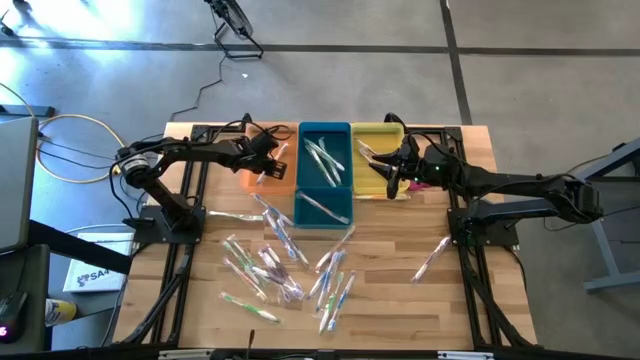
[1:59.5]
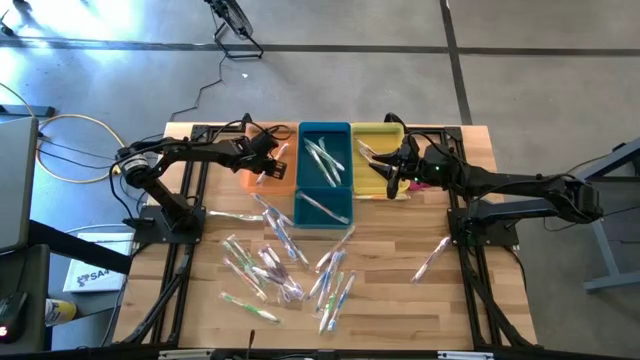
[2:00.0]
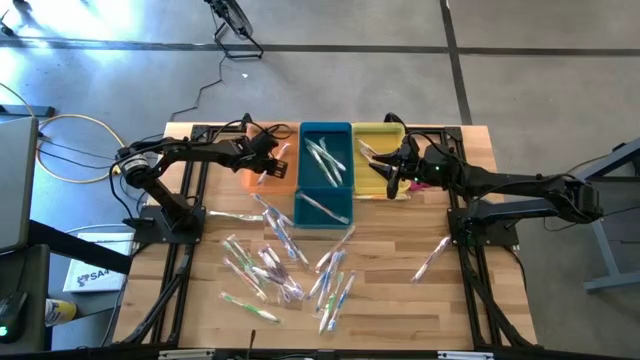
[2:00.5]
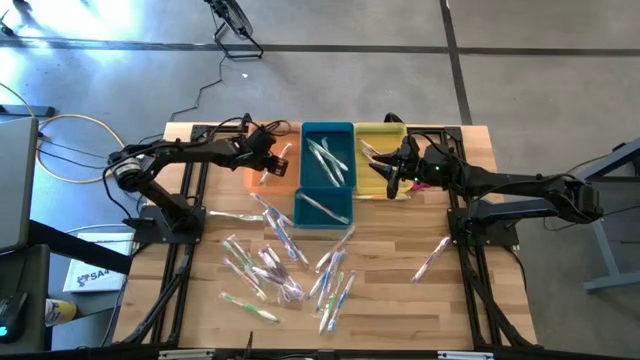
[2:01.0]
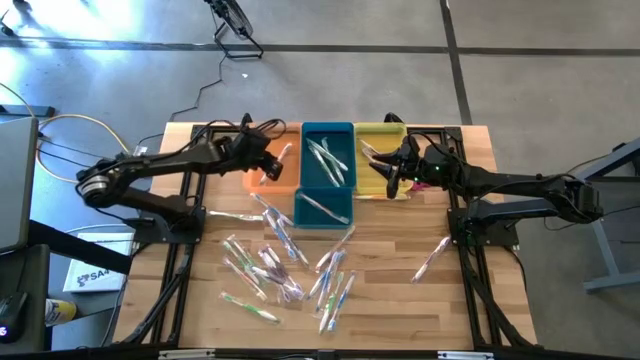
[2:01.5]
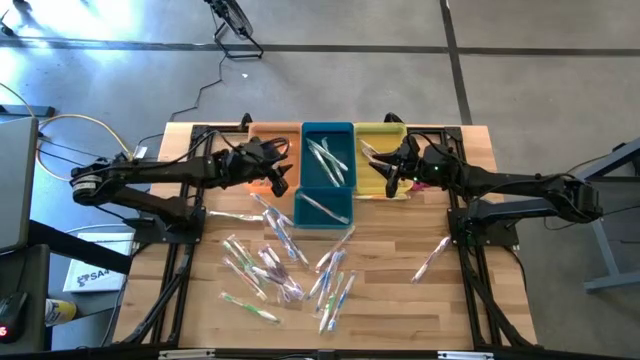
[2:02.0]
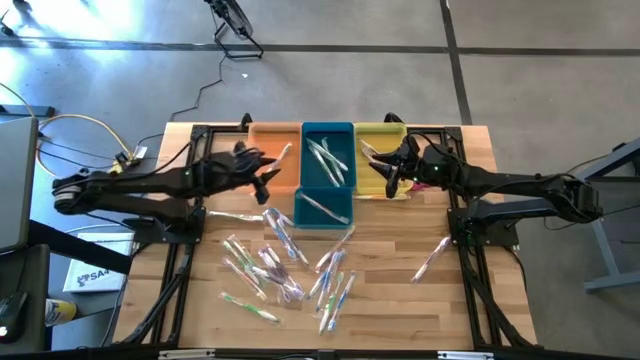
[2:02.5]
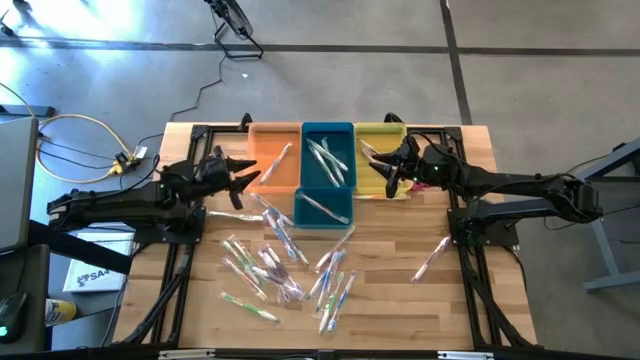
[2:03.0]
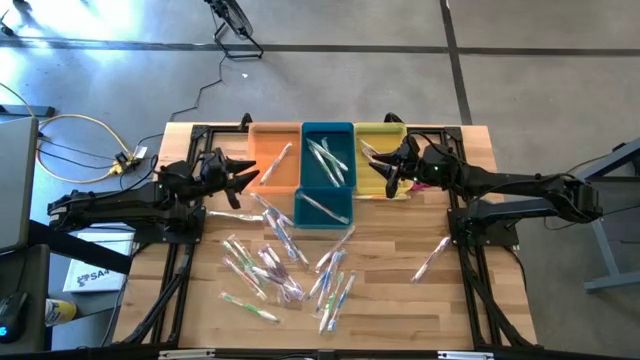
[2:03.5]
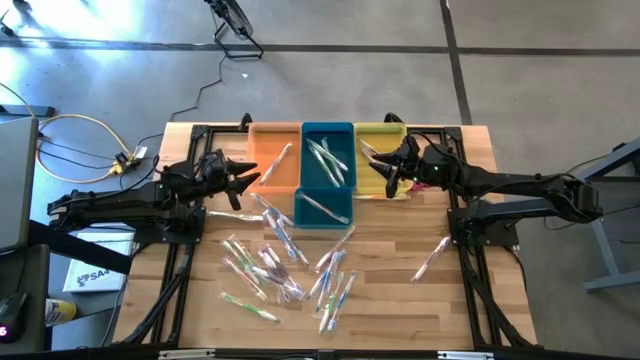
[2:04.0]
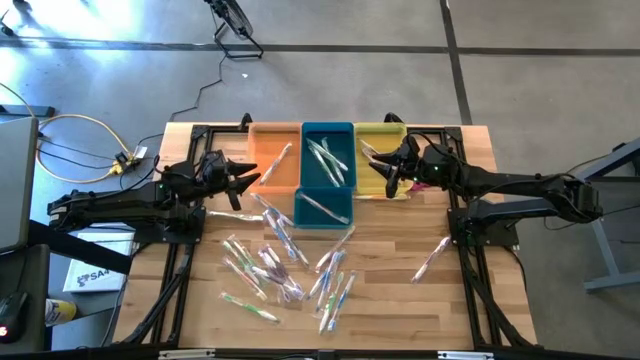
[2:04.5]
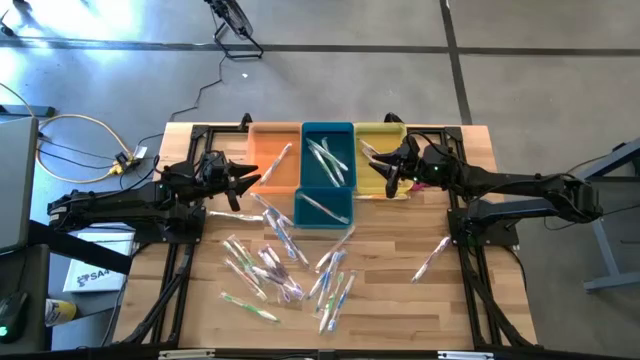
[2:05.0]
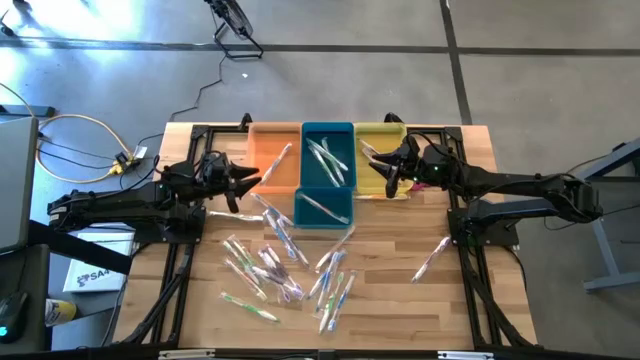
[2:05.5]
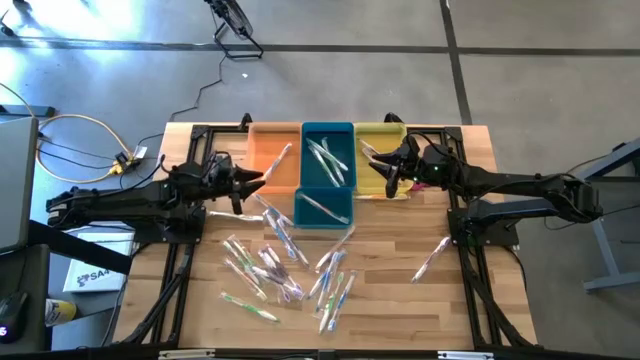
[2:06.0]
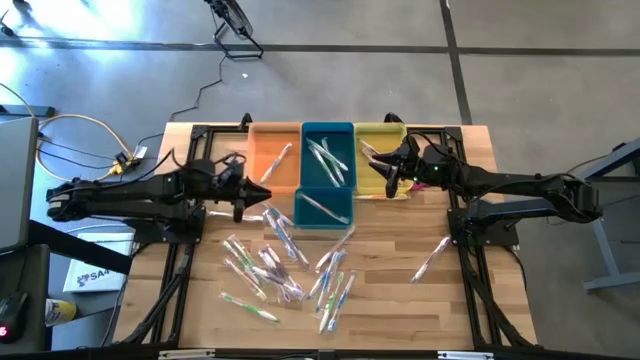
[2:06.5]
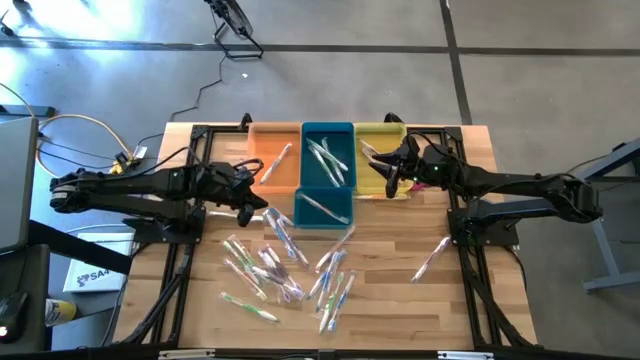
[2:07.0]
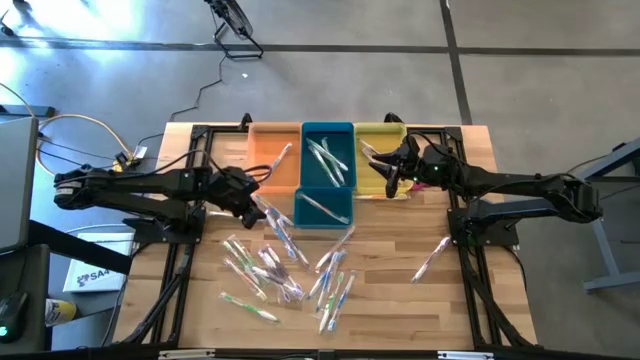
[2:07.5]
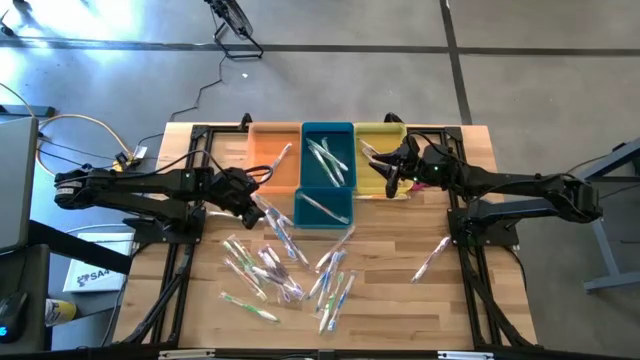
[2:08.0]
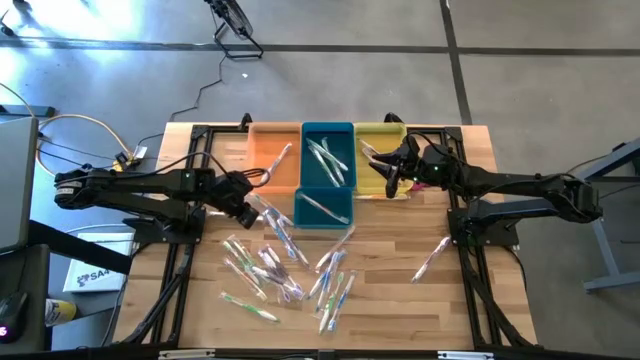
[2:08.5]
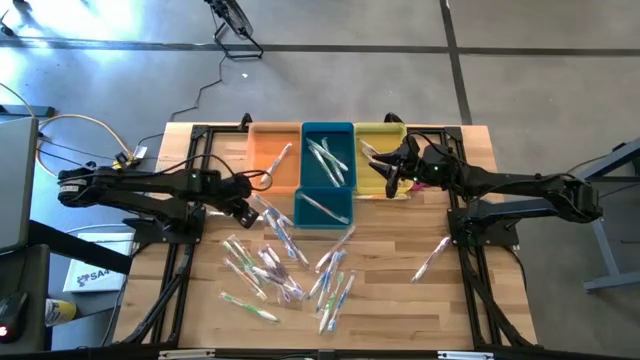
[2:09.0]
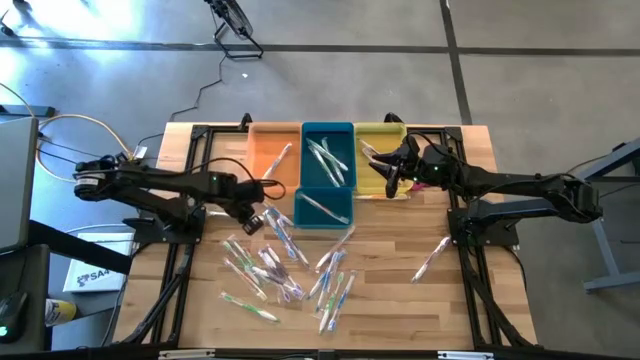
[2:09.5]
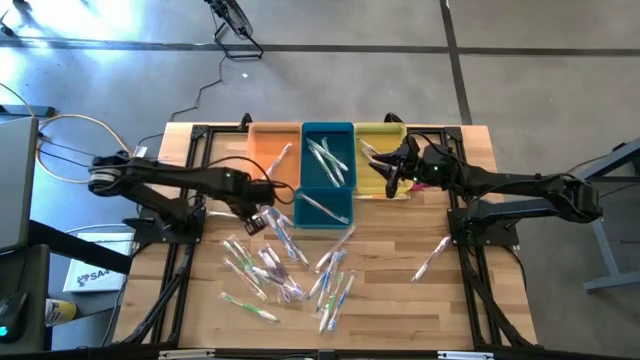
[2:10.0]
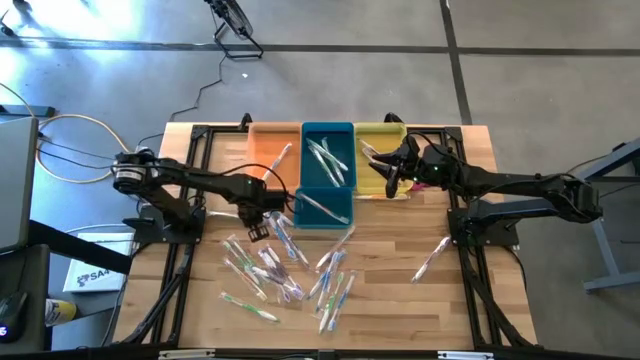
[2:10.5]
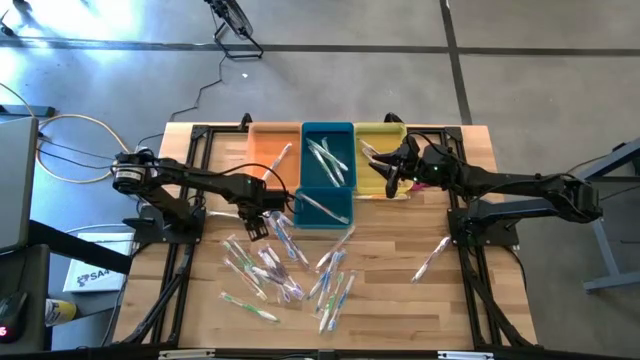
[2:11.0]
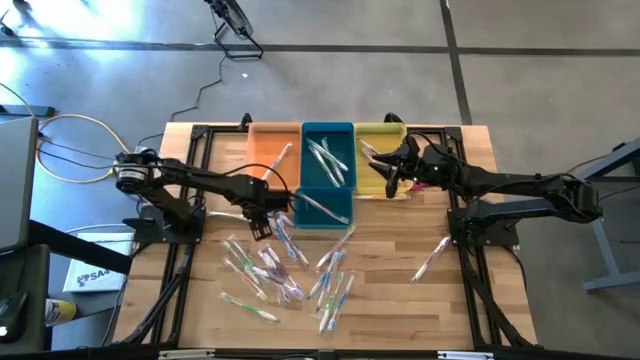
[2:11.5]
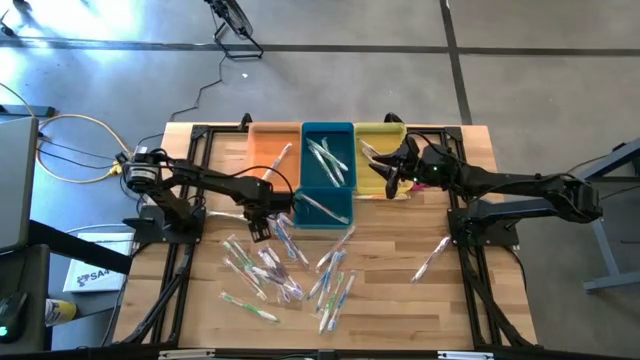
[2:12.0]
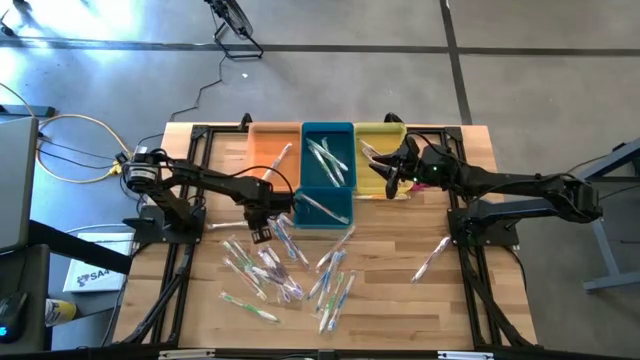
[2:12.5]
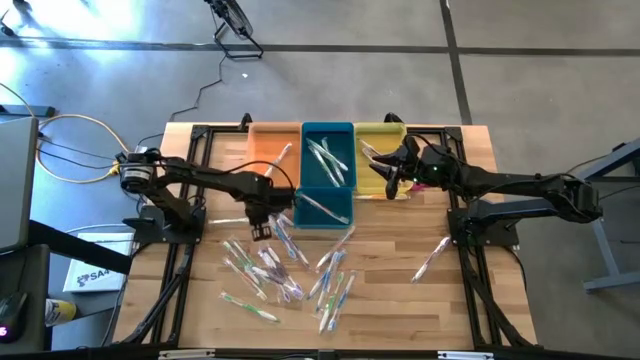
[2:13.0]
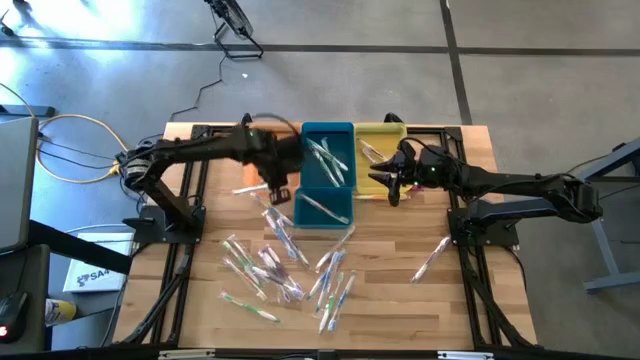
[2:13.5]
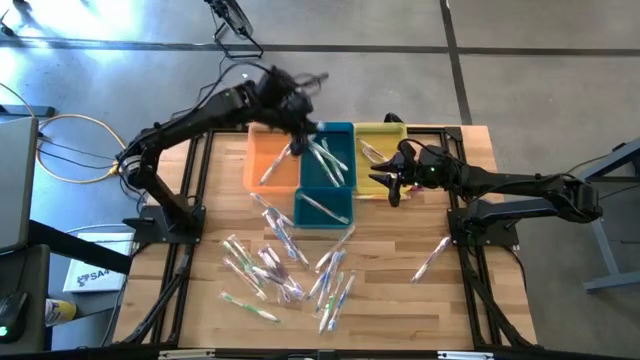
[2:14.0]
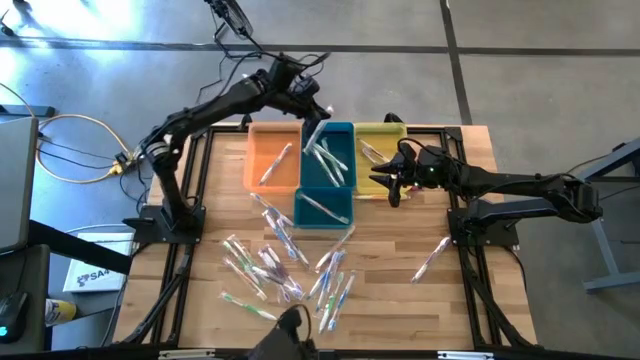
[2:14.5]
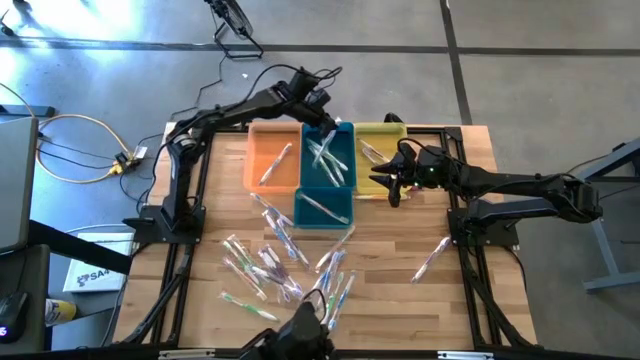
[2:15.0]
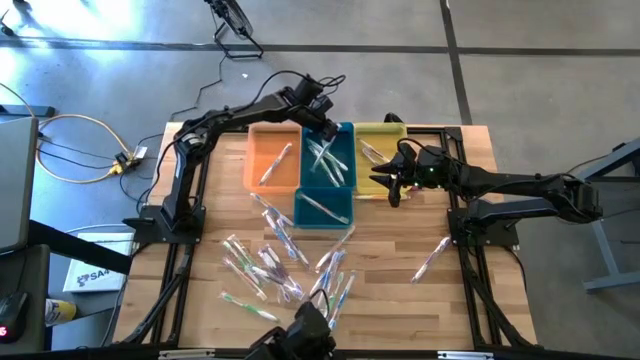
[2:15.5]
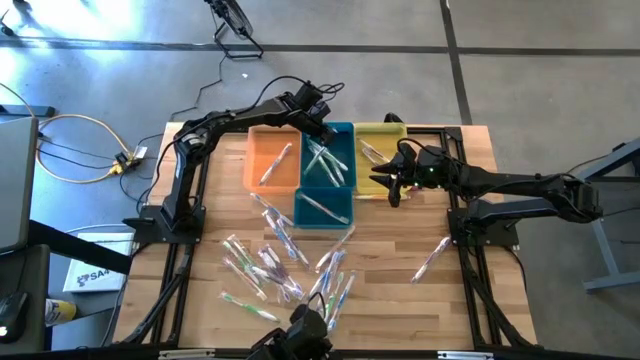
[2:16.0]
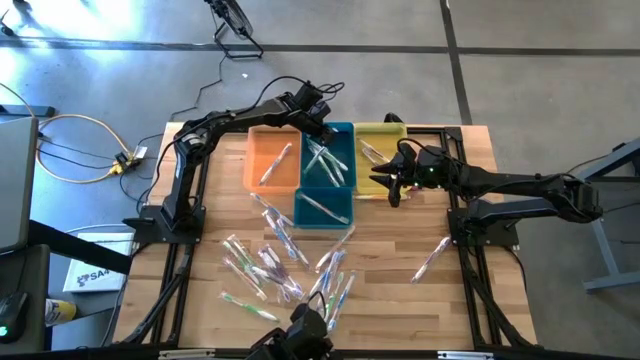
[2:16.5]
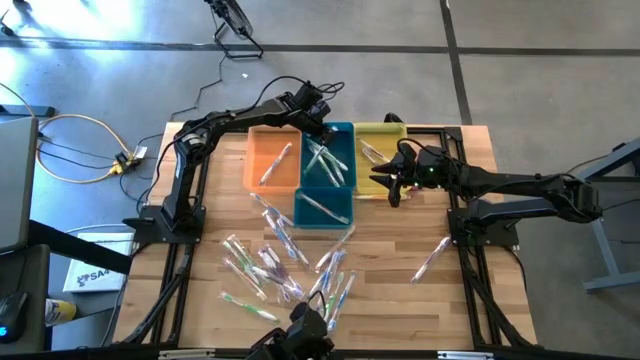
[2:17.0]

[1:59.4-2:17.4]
Task: Pick & Place Toothbrushes
Put the green toothbrush into the top blue bin

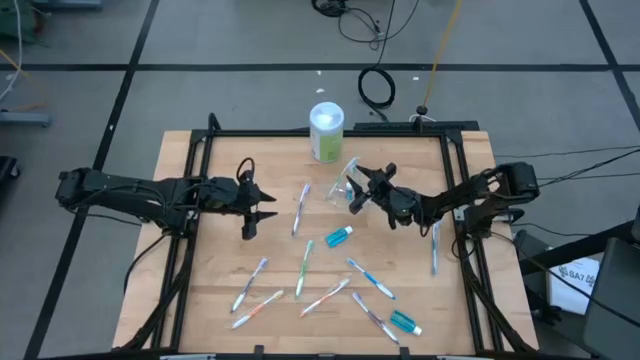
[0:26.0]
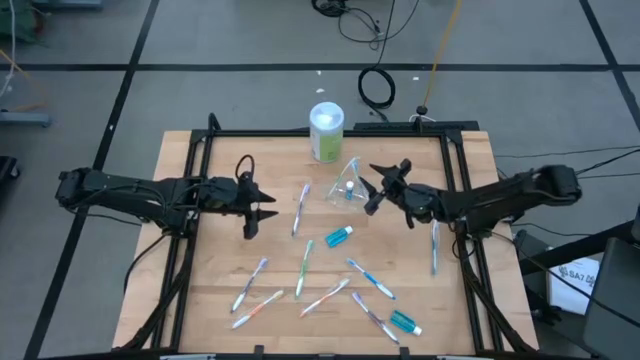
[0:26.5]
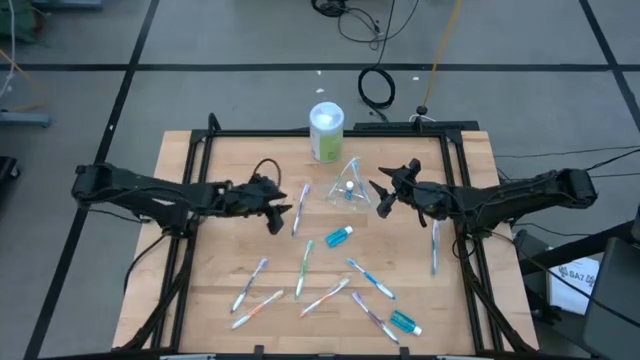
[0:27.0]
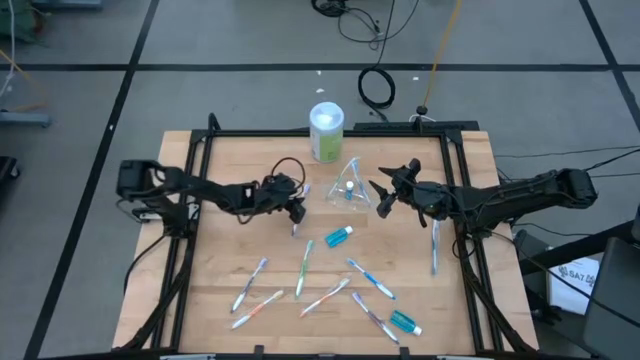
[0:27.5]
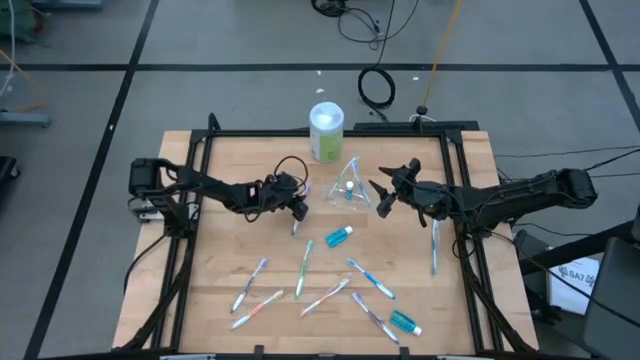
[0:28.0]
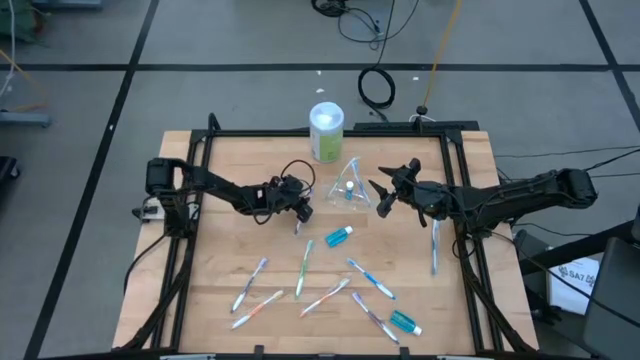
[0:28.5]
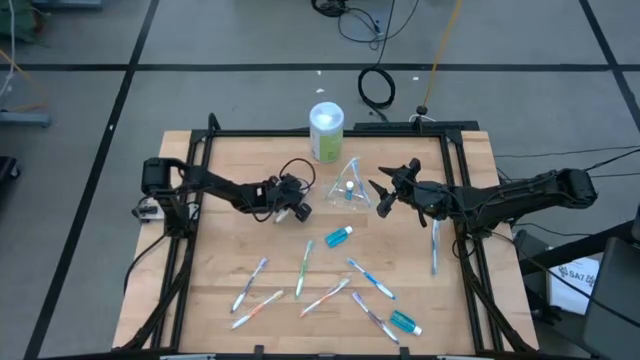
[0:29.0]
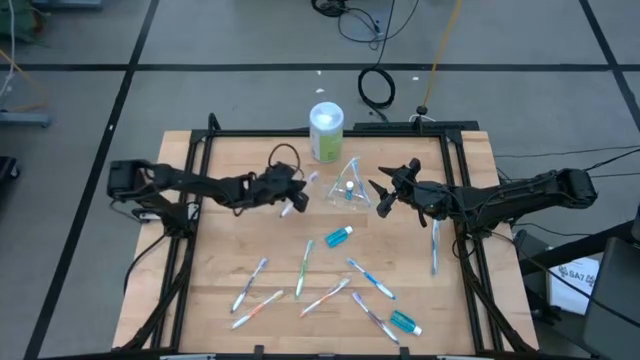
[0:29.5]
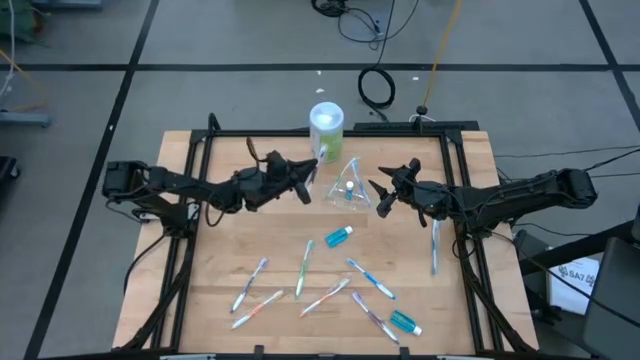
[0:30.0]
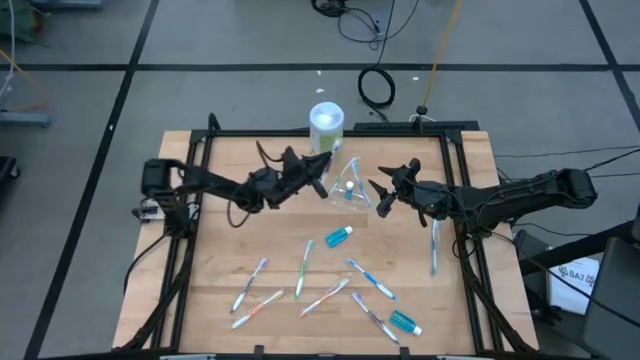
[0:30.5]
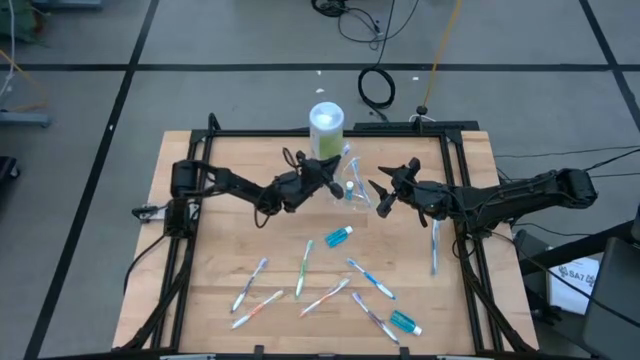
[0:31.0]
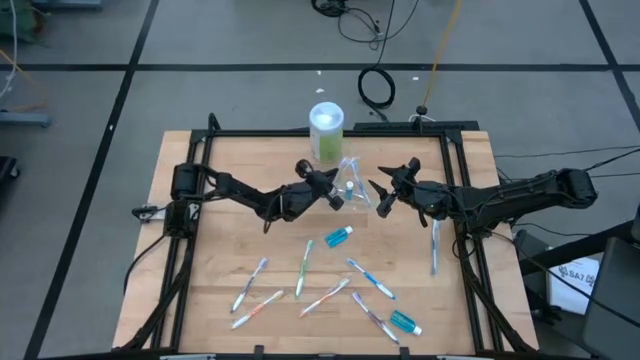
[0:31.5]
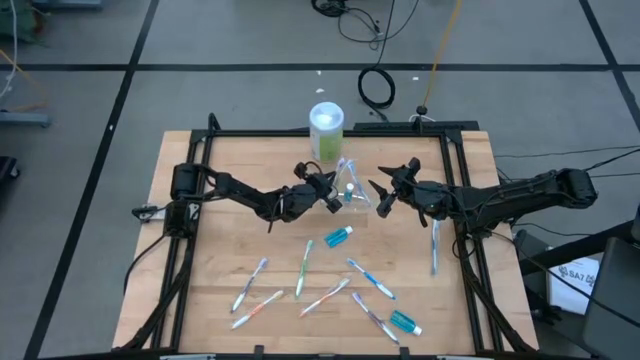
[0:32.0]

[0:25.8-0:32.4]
Task: Pick & Place toothbrushing station
Put the top middle violet toothbrush into the transparent organizer
